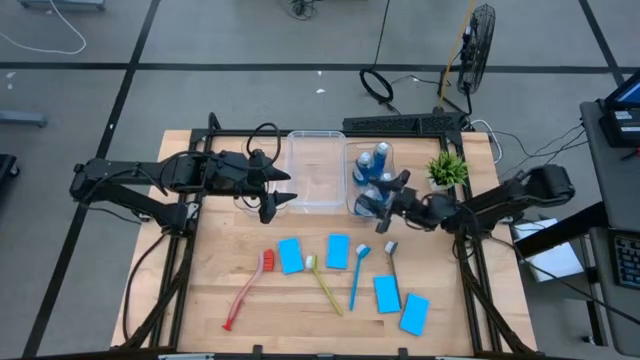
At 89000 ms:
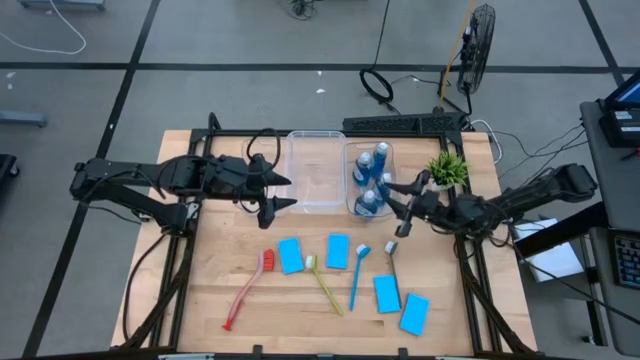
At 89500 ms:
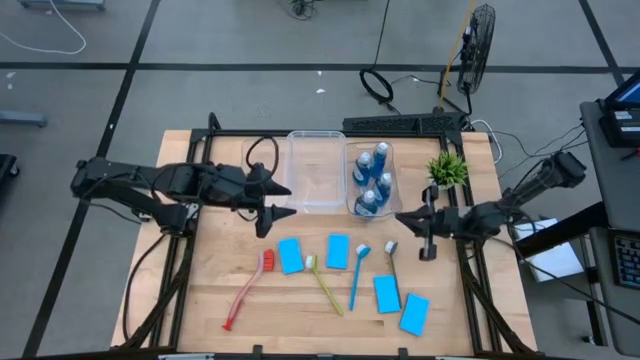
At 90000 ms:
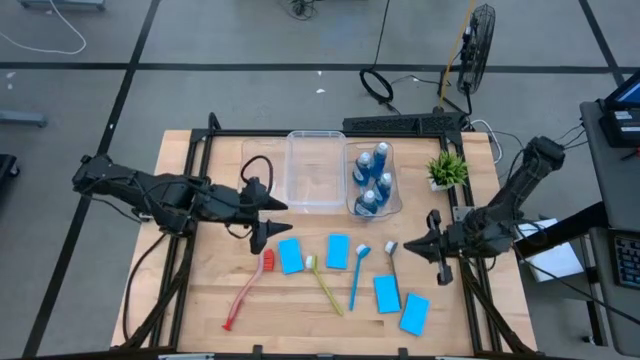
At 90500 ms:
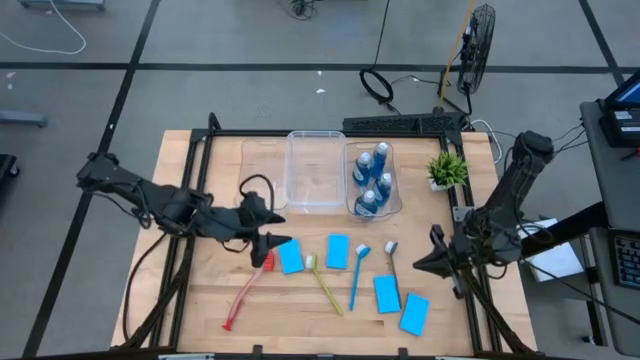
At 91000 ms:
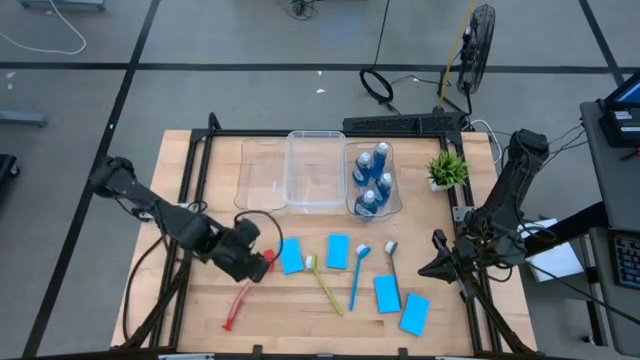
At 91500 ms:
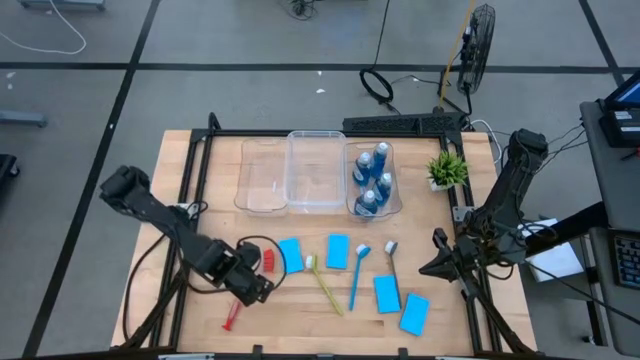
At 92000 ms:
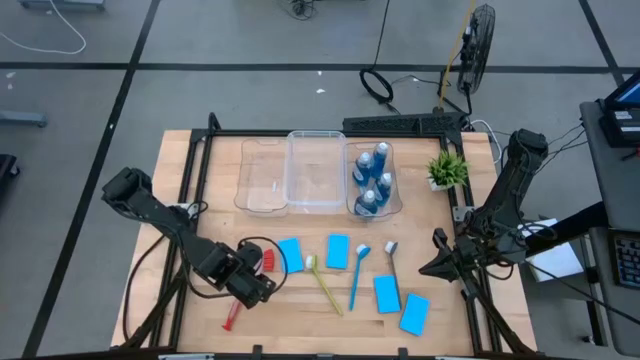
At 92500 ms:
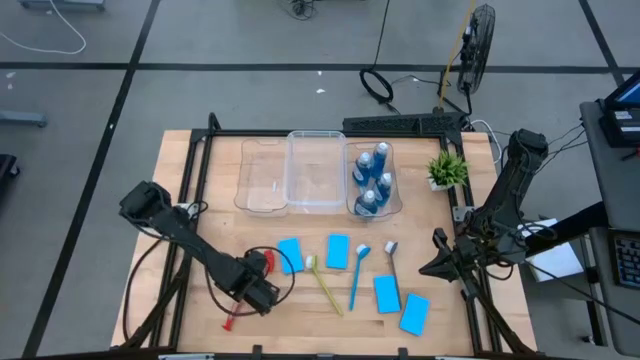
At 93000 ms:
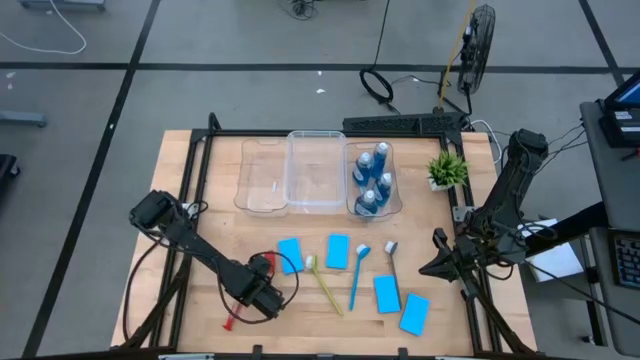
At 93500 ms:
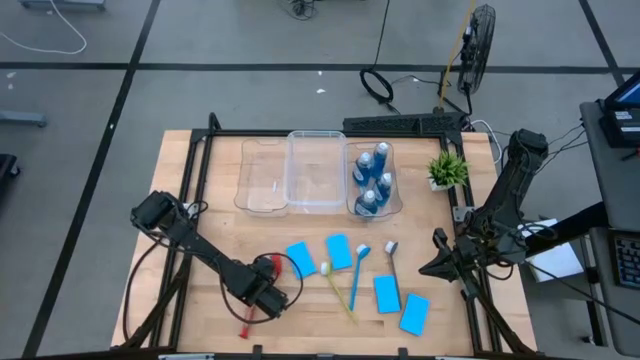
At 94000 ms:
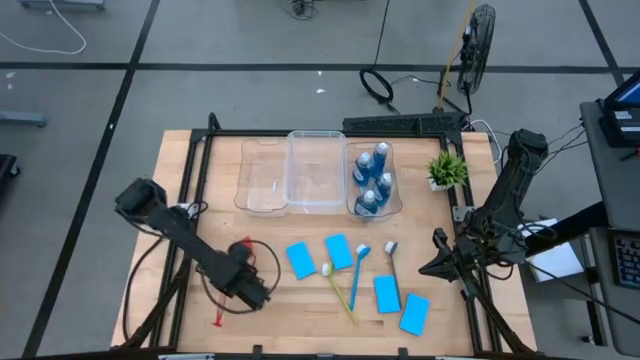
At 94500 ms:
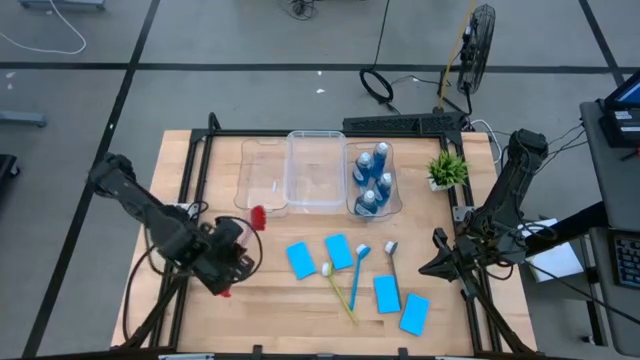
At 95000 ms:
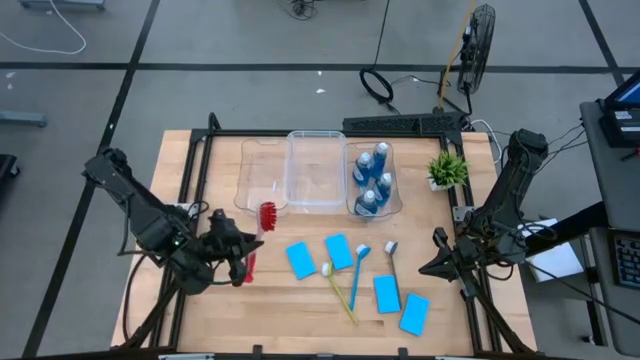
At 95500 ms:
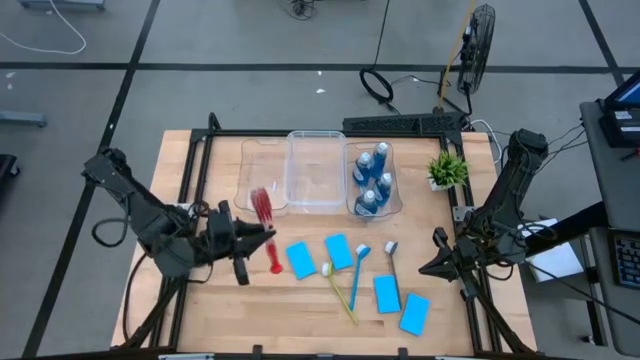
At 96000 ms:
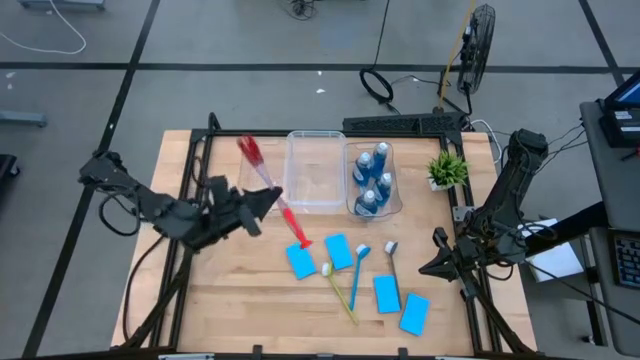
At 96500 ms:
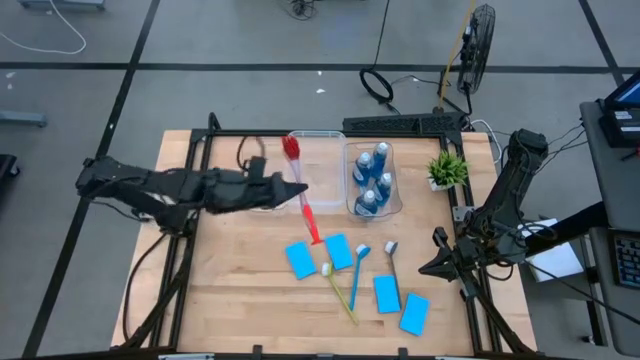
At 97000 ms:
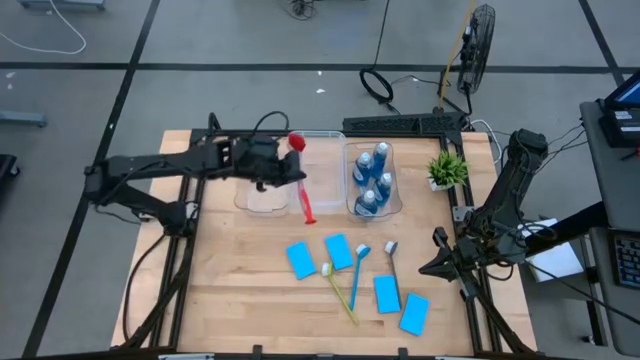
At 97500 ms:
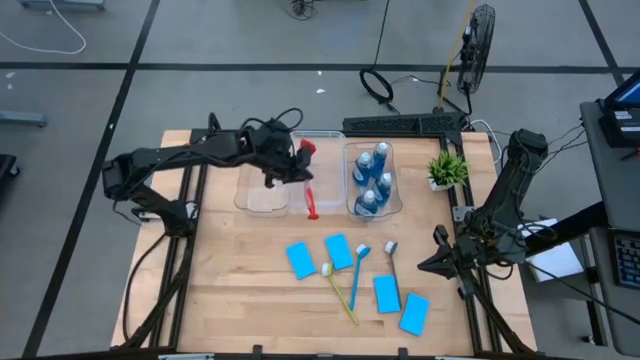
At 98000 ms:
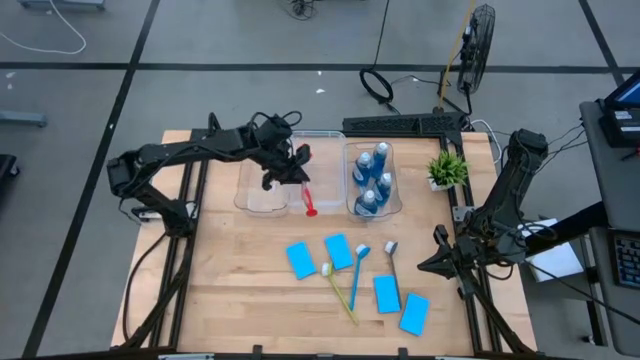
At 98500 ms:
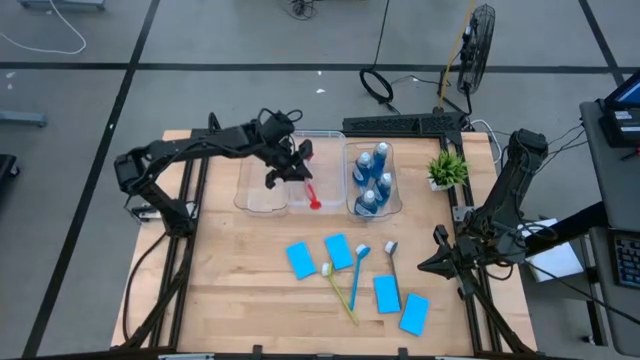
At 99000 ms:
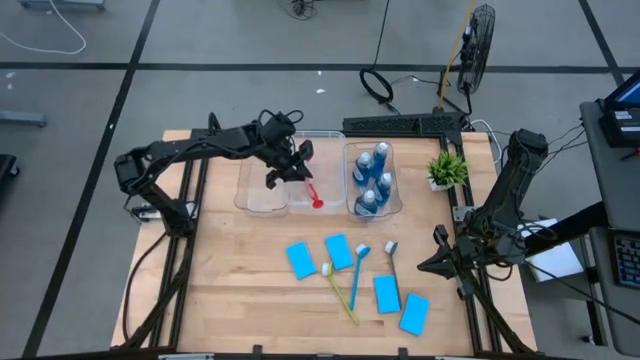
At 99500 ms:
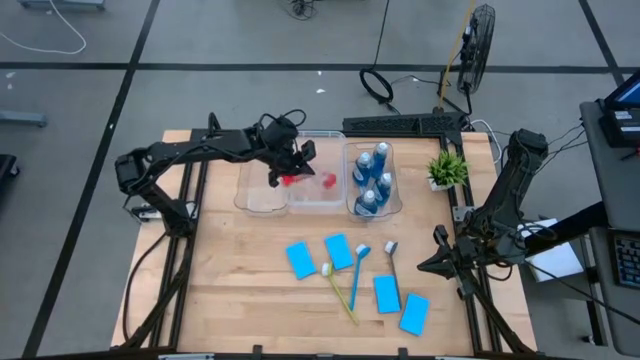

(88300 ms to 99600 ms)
Task: Pick & Place Kitchen Sink Supplies
Put the orange dishwashing brush into the white bin

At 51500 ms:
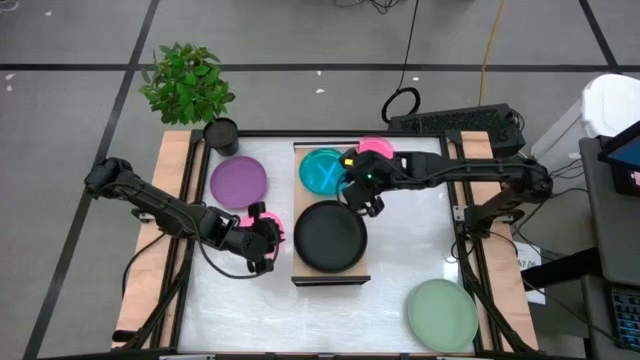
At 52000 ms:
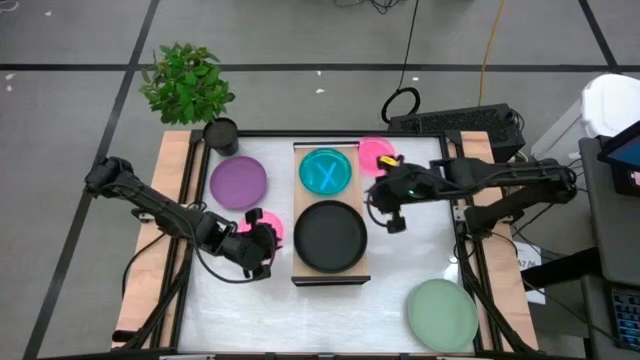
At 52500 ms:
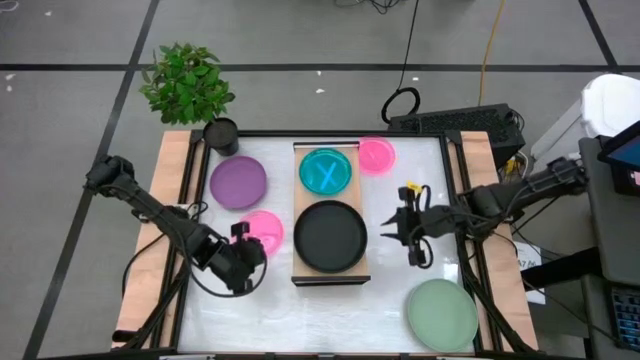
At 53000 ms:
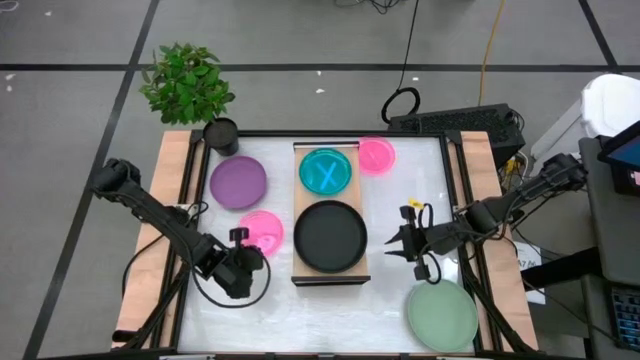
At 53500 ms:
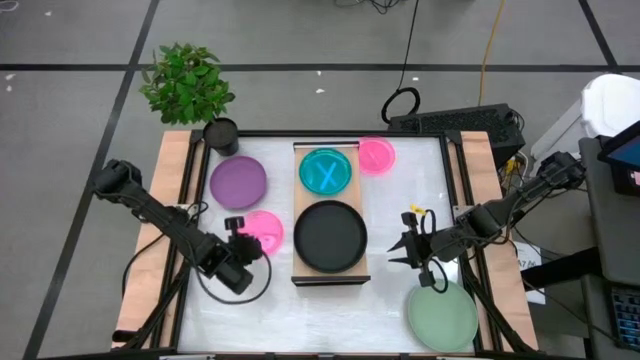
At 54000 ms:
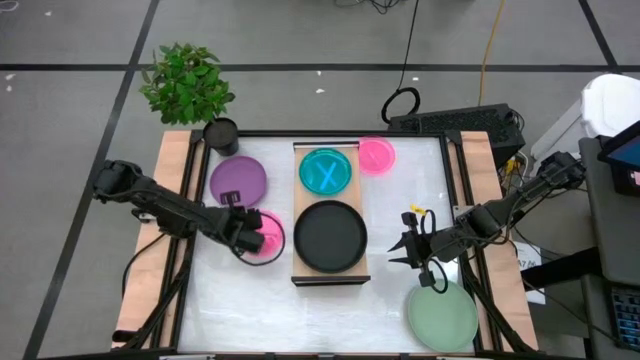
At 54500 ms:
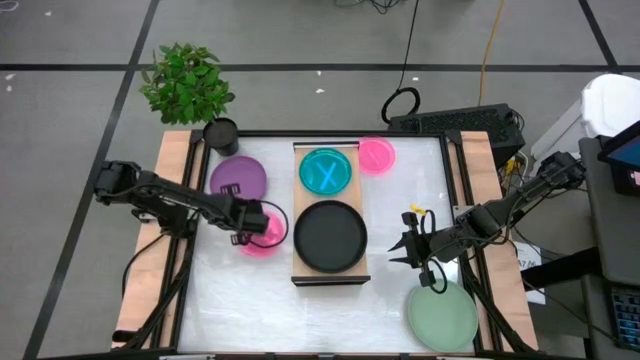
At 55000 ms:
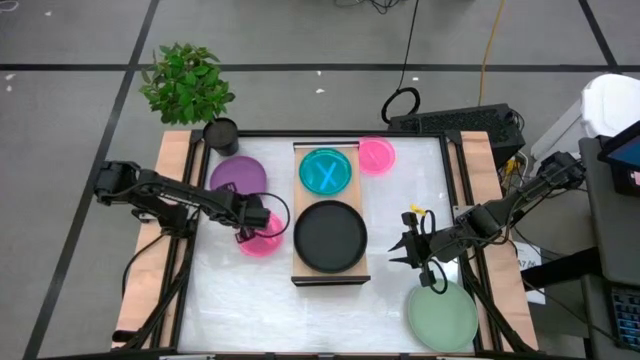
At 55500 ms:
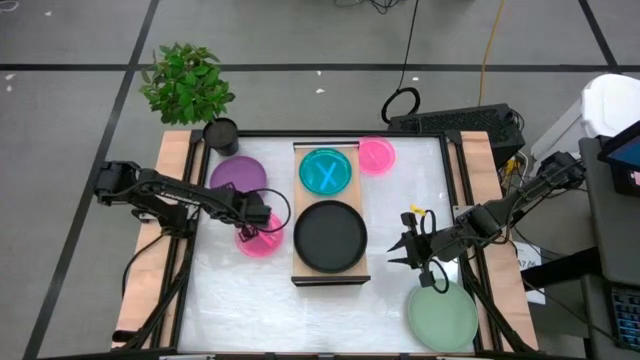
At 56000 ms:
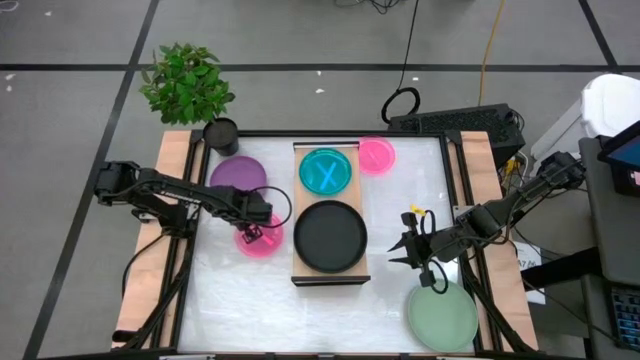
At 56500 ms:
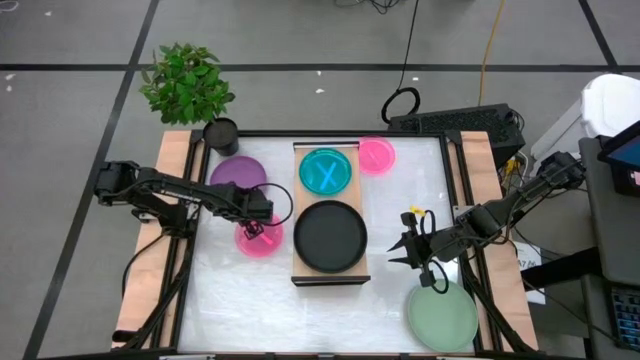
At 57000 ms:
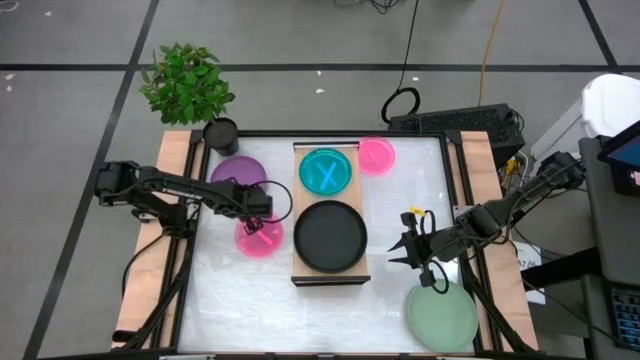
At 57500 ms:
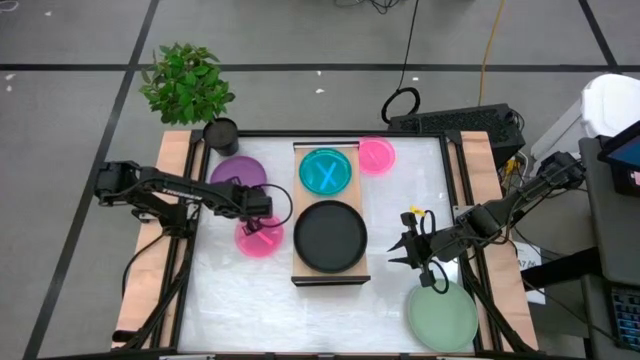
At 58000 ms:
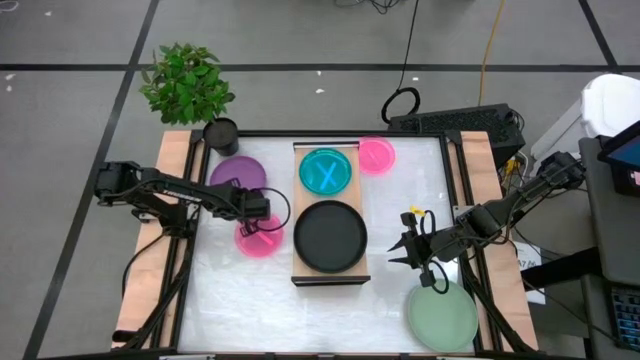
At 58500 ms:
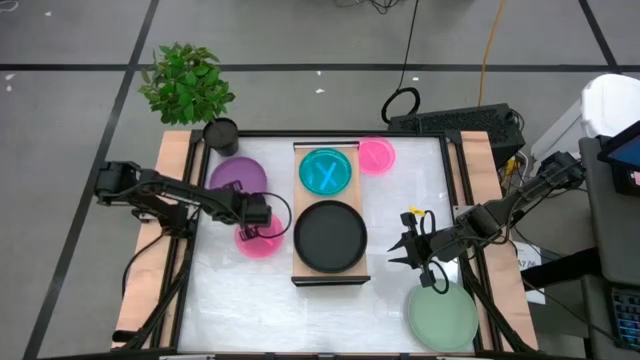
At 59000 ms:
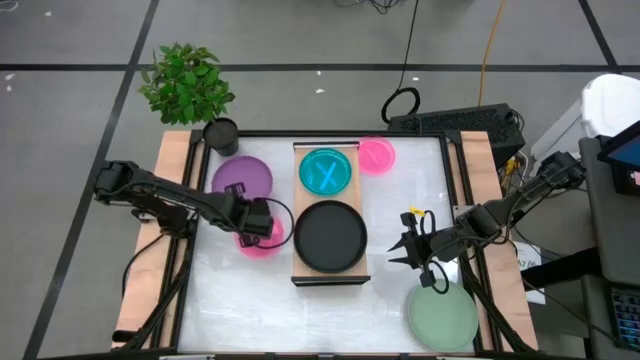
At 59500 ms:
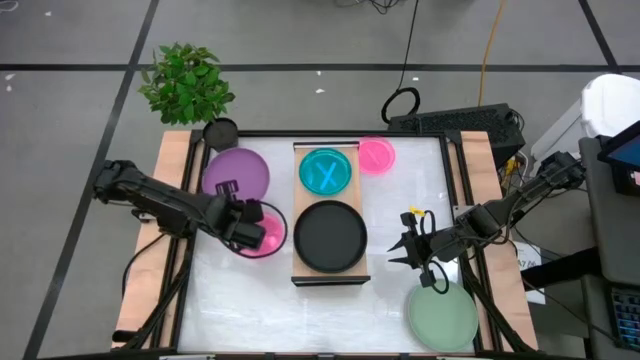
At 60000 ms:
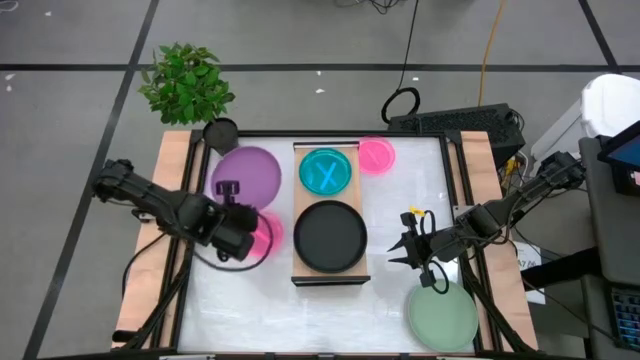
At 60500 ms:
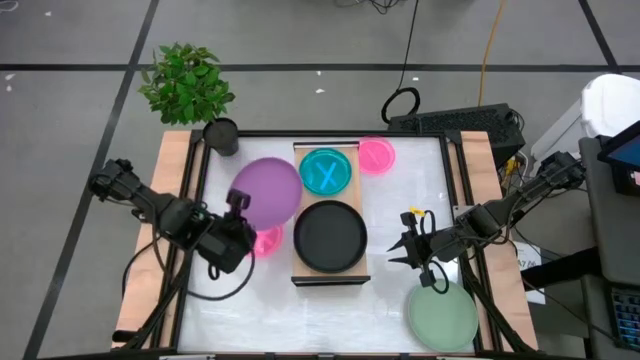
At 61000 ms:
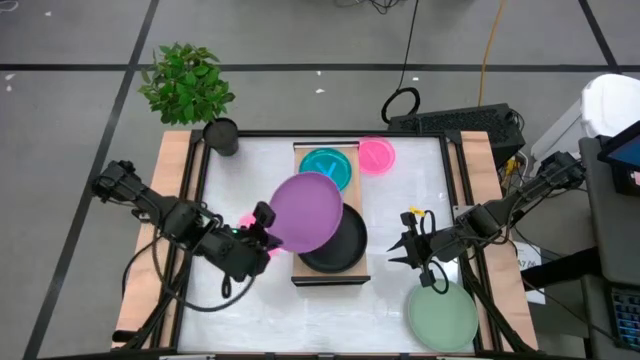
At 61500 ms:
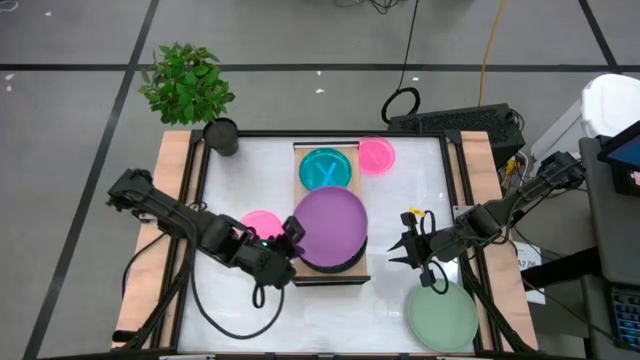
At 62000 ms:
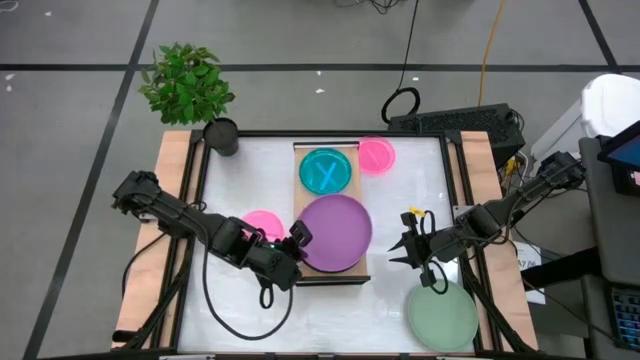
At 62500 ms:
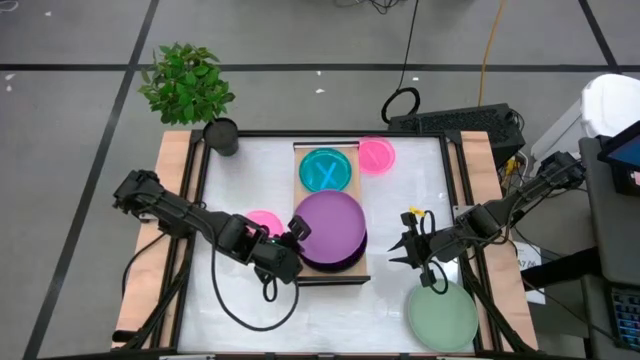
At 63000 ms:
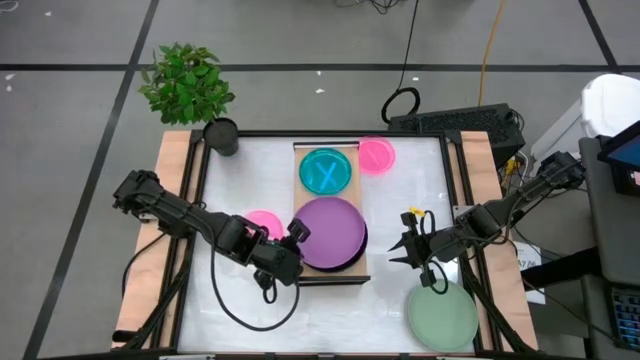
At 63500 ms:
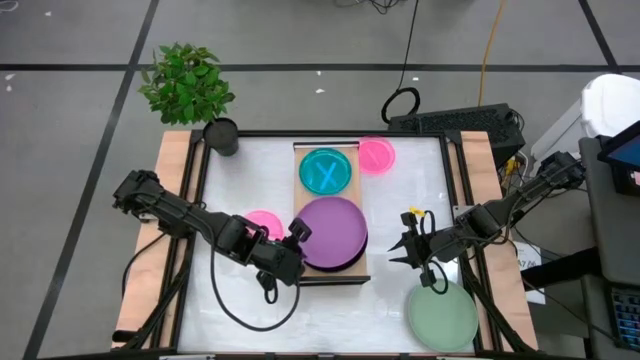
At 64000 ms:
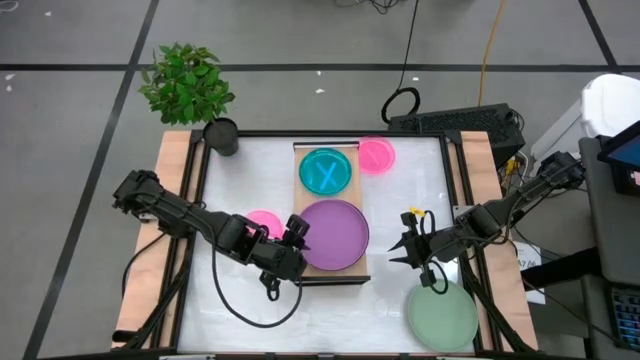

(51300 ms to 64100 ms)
Task: Place and stack plates onto a shelf
Stack the purple plate on top of the black plate
